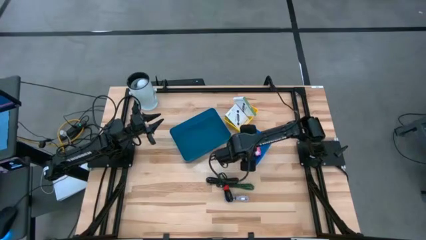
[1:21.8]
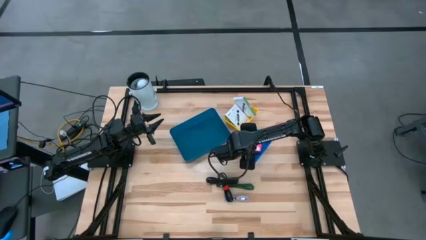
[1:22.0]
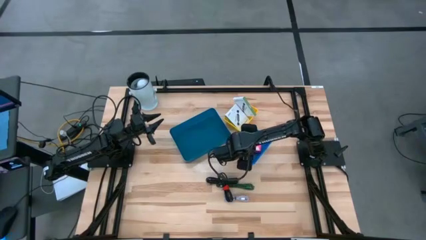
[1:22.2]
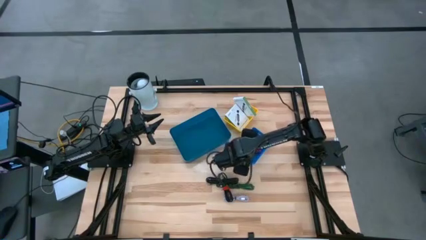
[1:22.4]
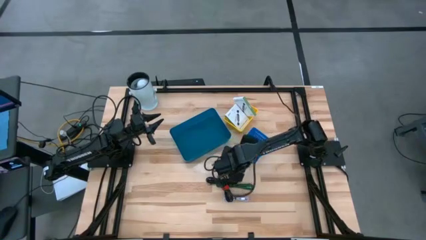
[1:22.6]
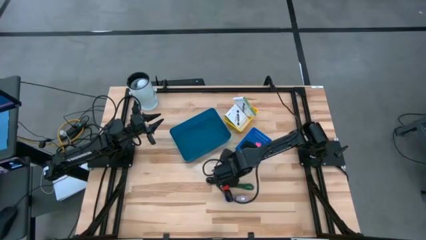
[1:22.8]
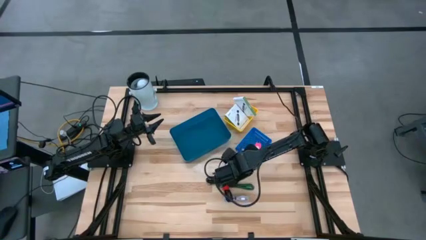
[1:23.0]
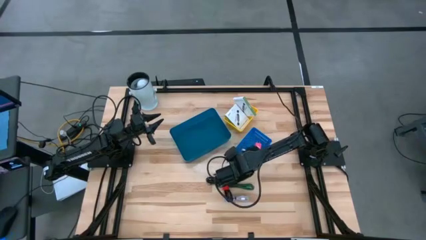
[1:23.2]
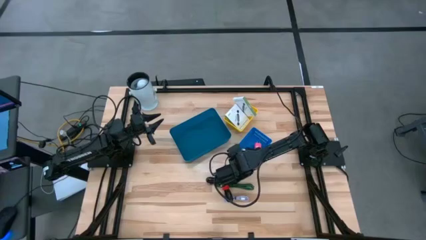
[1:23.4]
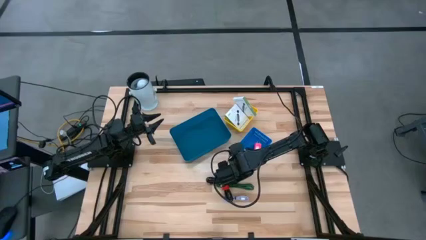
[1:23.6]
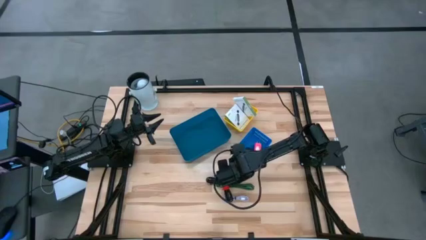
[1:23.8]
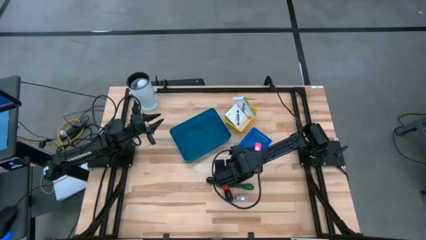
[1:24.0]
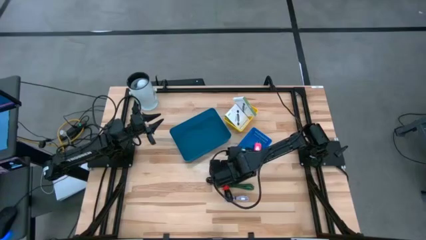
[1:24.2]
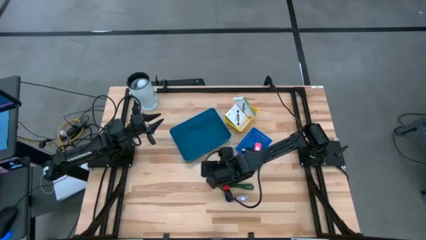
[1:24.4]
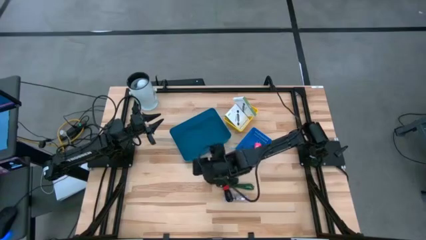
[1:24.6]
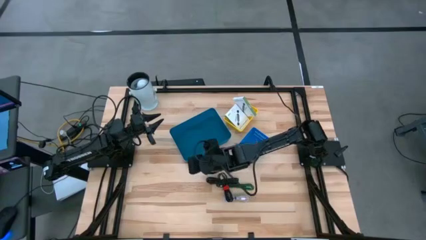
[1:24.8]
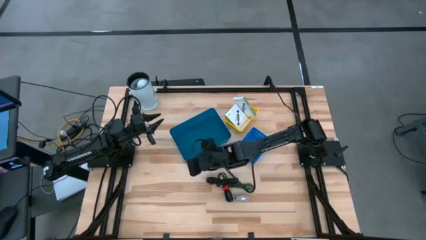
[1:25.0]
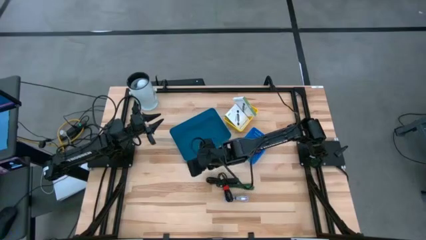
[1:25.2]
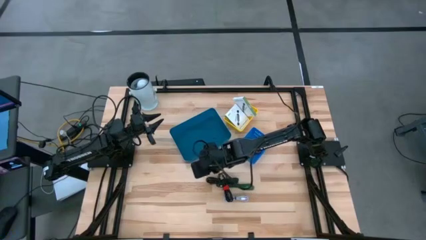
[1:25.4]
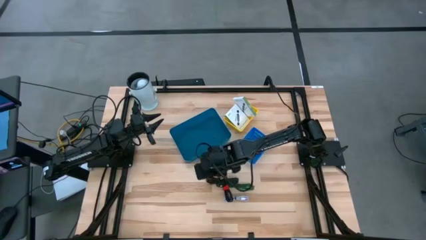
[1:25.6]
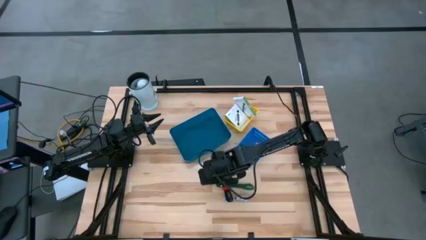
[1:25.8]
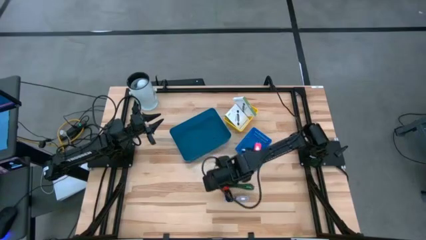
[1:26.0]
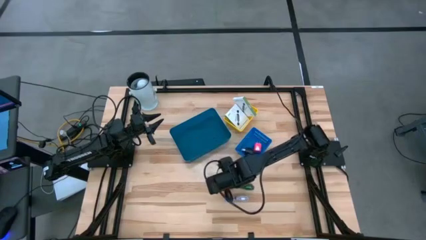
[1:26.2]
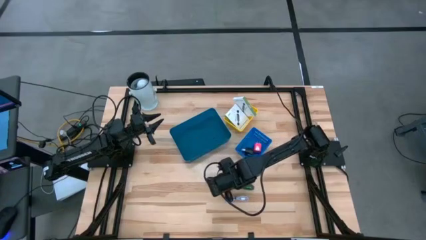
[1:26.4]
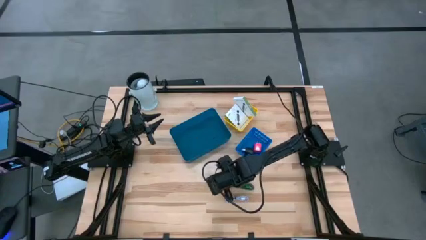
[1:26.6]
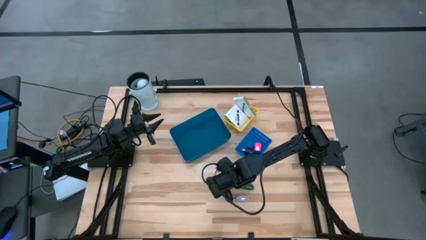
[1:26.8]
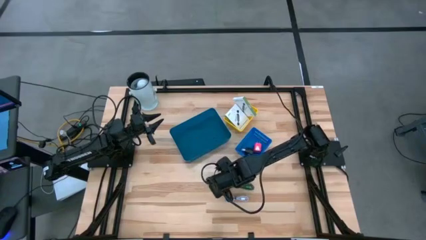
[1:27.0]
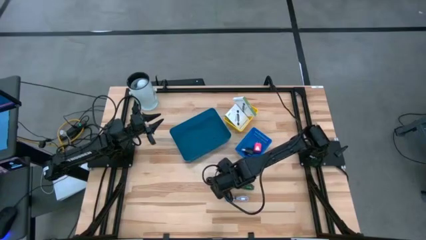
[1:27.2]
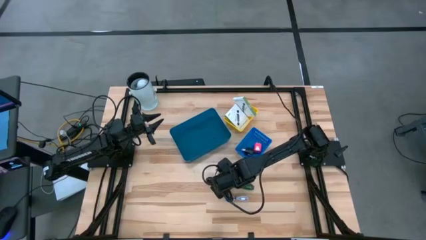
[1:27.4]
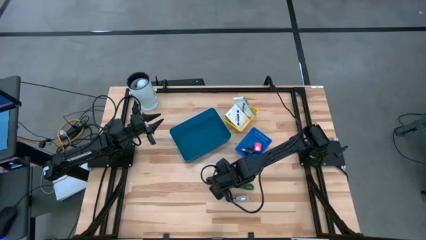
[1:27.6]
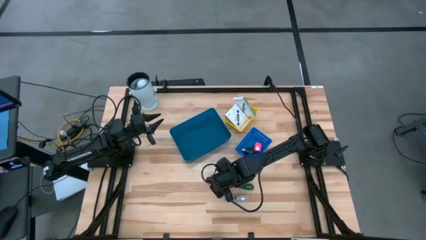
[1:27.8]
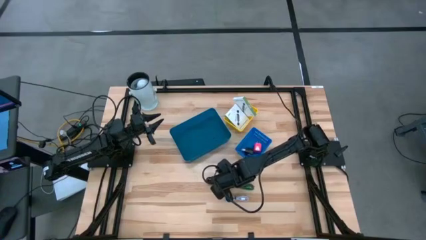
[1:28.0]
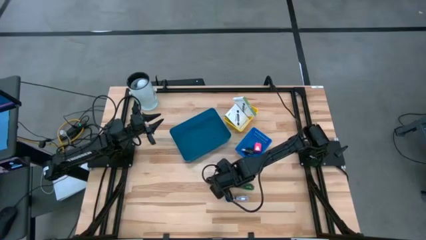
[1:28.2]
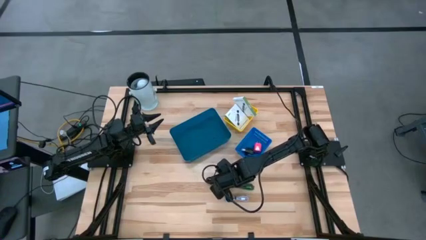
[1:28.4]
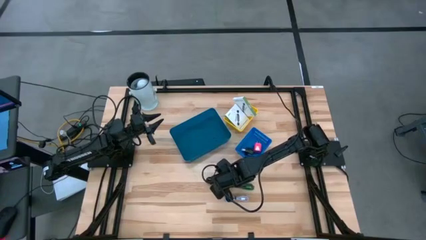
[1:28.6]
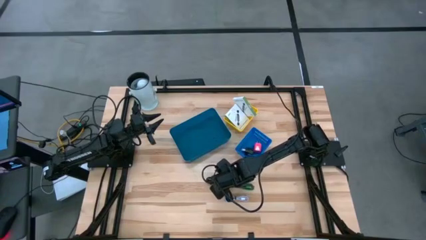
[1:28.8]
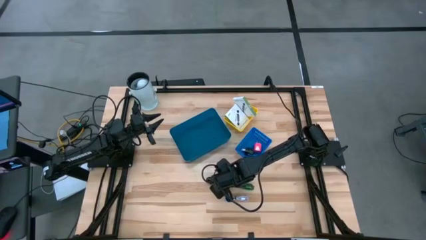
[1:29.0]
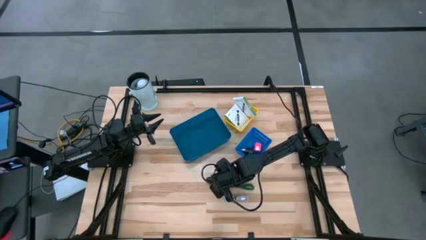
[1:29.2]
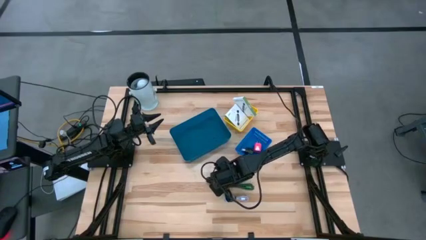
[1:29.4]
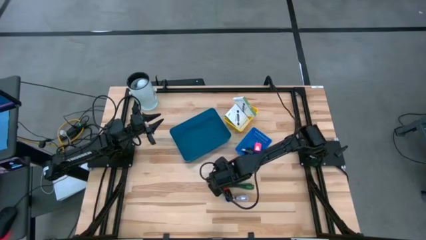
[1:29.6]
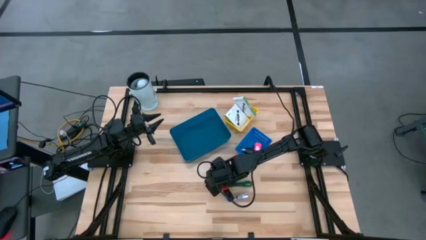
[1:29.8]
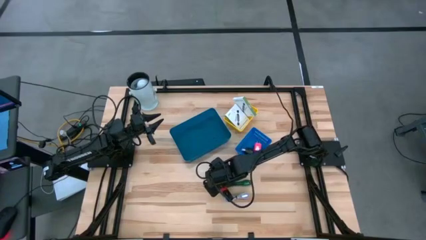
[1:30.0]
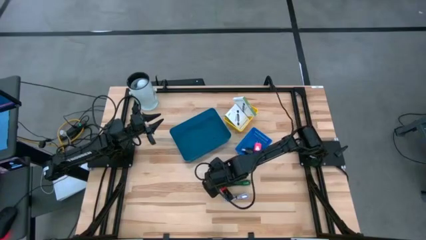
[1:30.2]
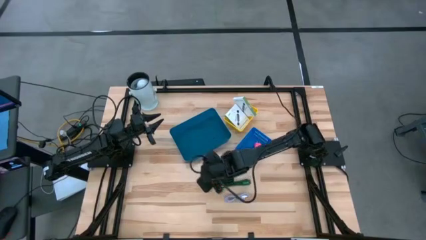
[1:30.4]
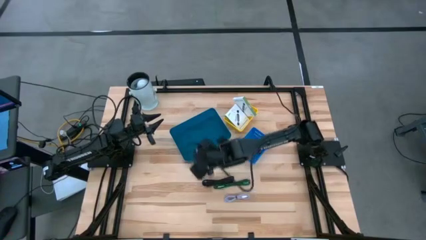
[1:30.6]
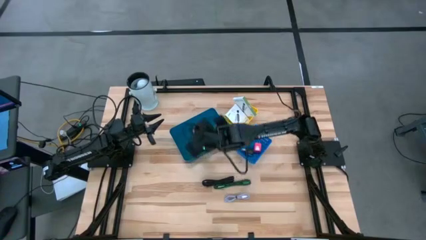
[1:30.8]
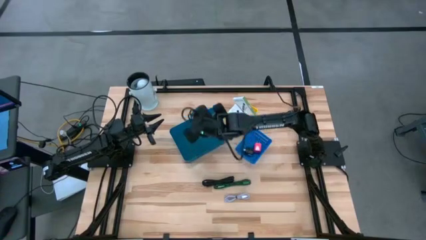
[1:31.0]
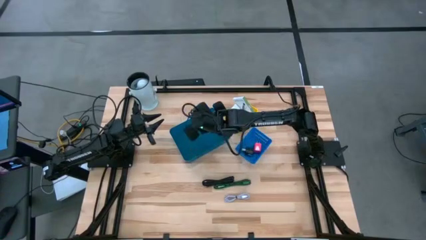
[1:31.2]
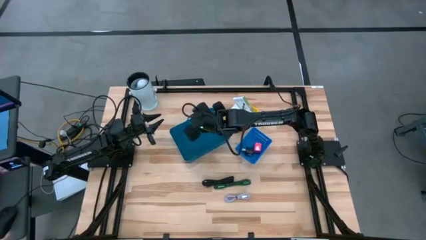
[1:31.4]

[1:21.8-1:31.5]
Task: Pick and place items into bin
Put the bottom black charger cable into the dark blue bin

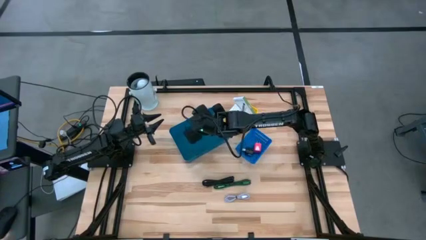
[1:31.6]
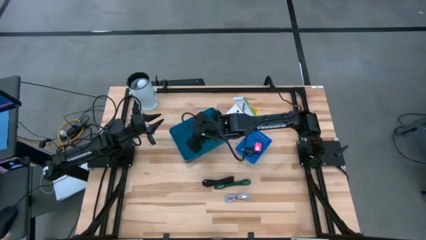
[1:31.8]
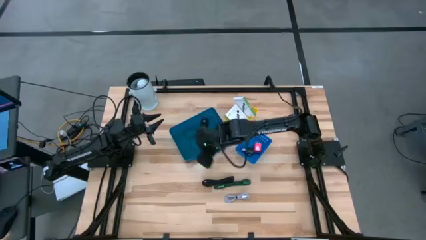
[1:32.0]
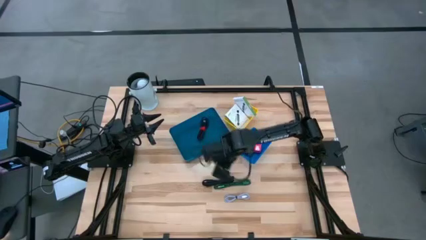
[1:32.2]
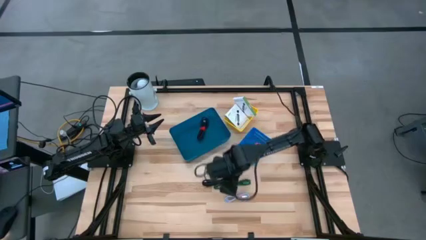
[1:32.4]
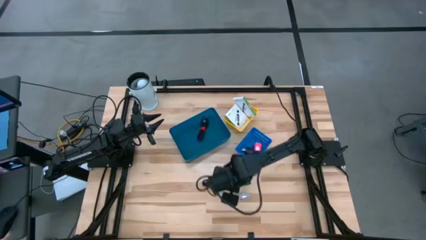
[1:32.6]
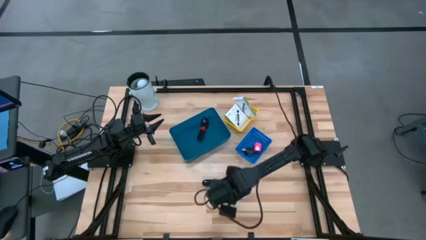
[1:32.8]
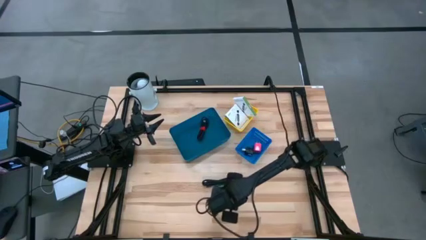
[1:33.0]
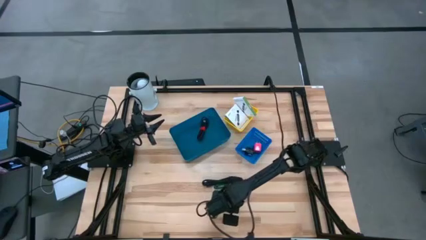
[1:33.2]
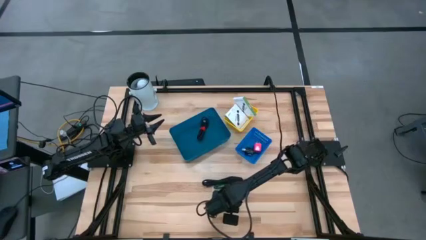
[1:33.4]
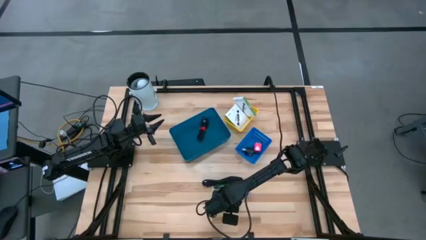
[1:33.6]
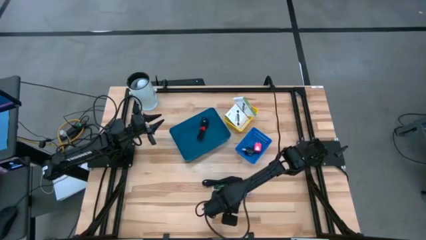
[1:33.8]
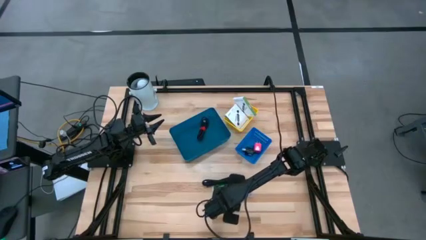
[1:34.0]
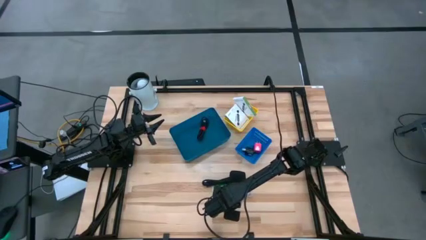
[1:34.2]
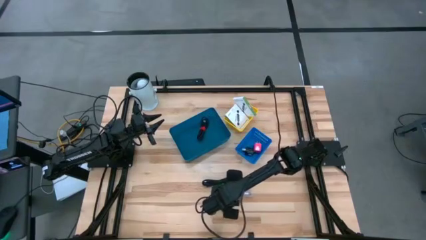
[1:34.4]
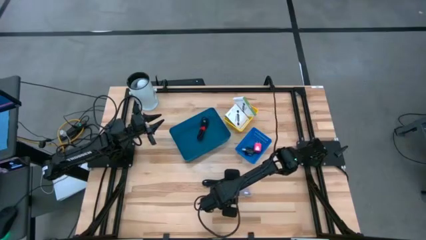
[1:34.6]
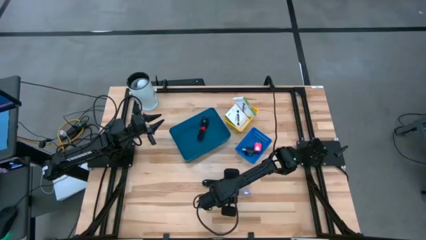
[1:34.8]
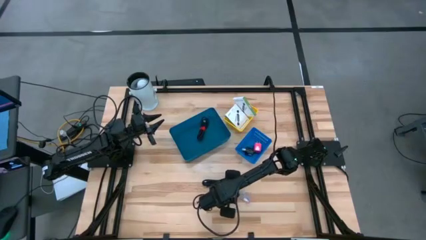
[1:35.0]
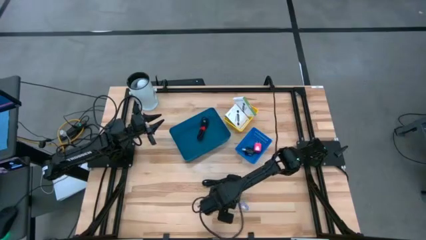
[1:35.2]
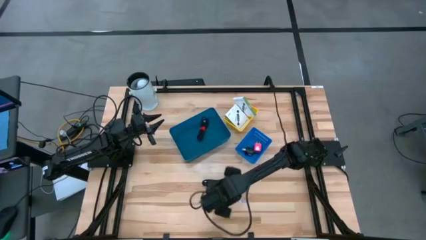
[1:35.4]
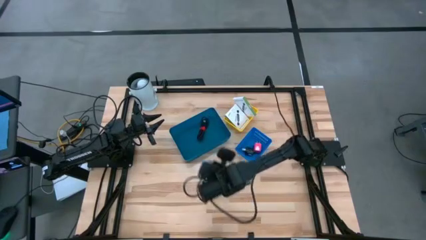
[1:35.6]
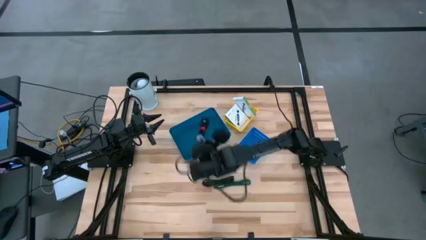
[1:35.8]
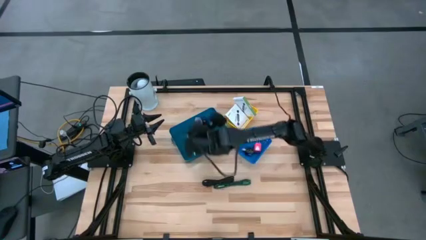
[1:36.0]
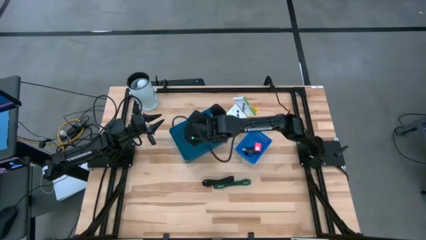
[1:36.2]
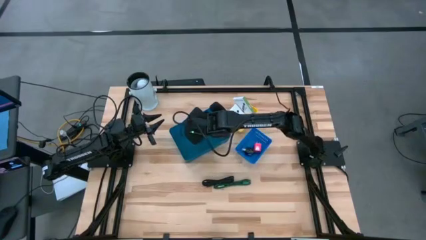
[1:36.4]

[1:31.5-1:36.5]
Put the gray charger cable into the dark blue bin
